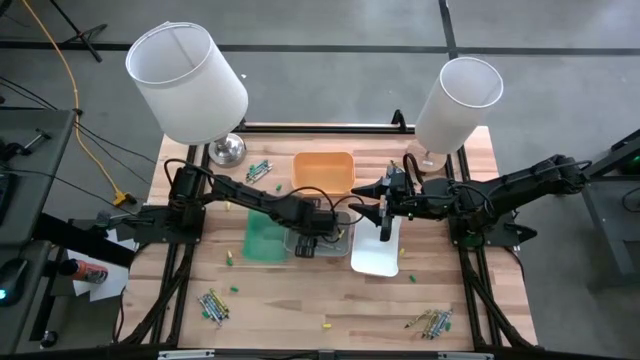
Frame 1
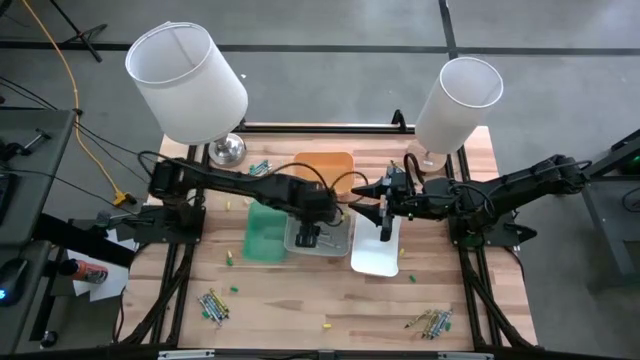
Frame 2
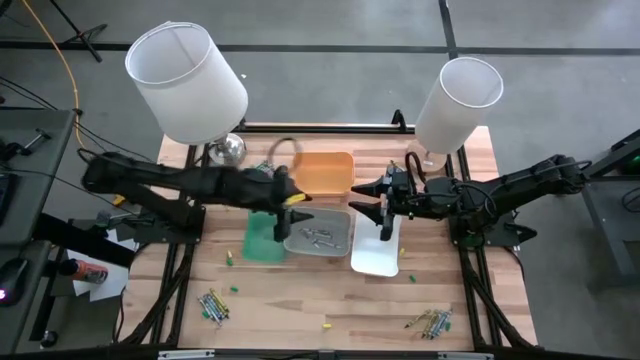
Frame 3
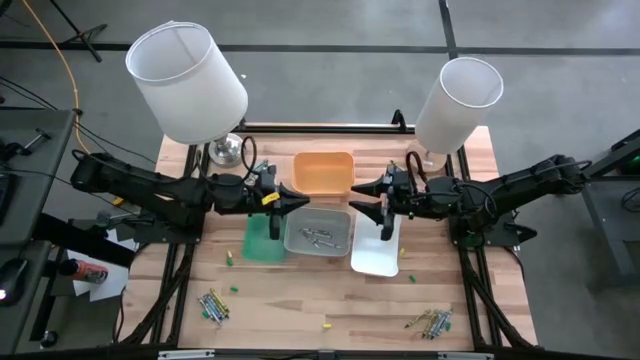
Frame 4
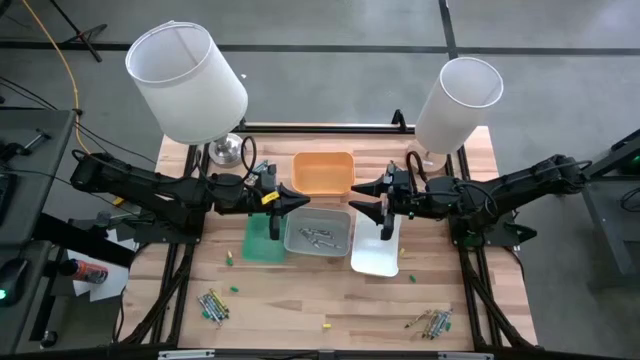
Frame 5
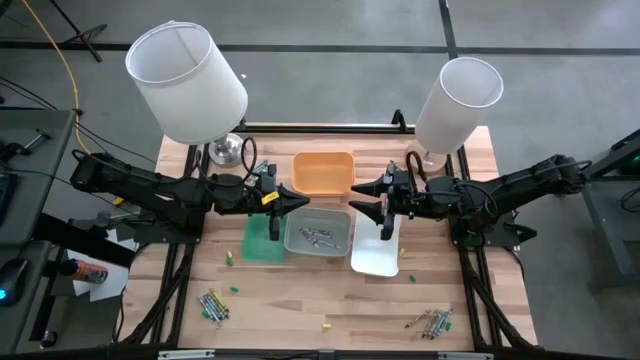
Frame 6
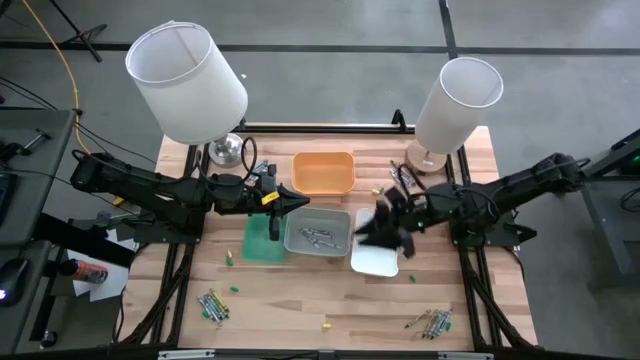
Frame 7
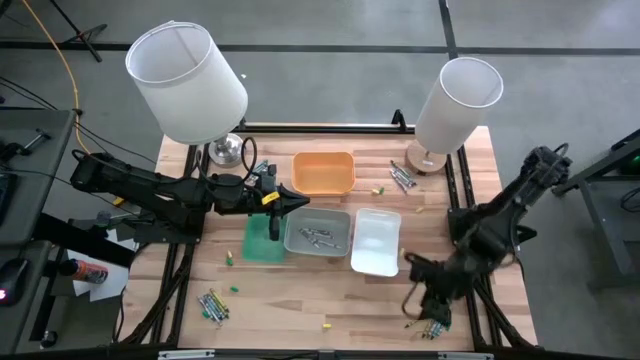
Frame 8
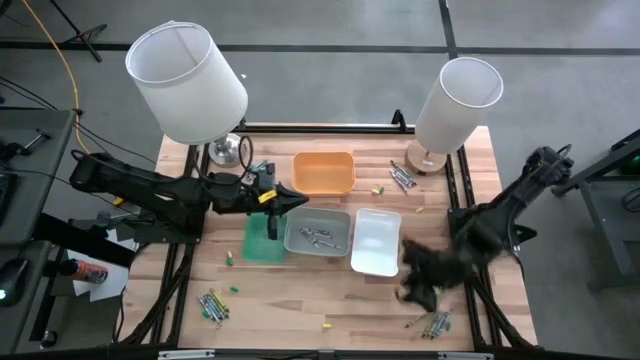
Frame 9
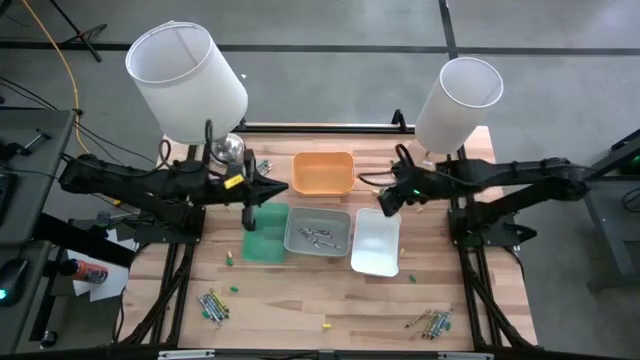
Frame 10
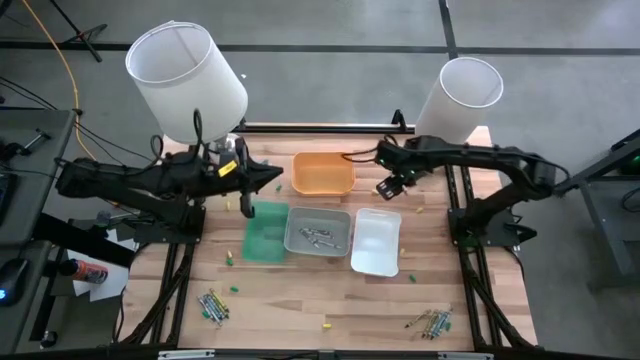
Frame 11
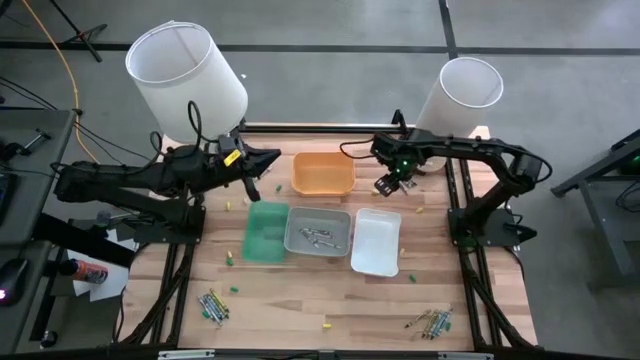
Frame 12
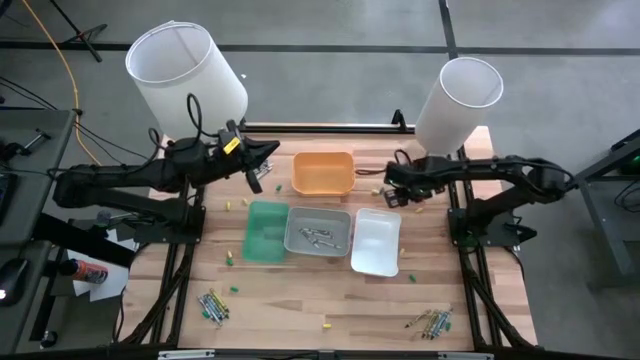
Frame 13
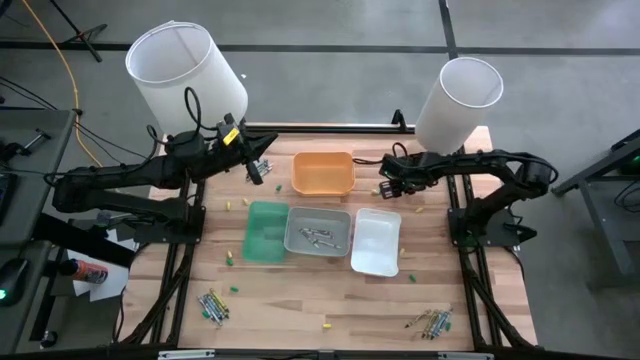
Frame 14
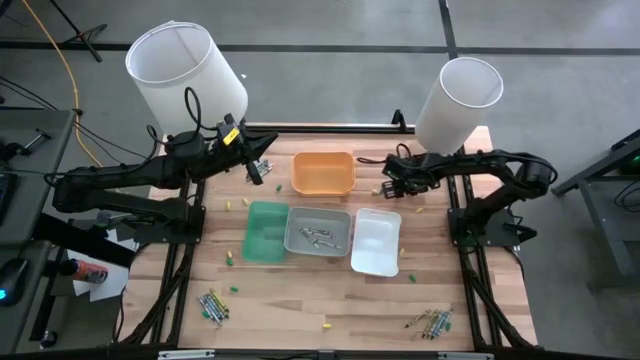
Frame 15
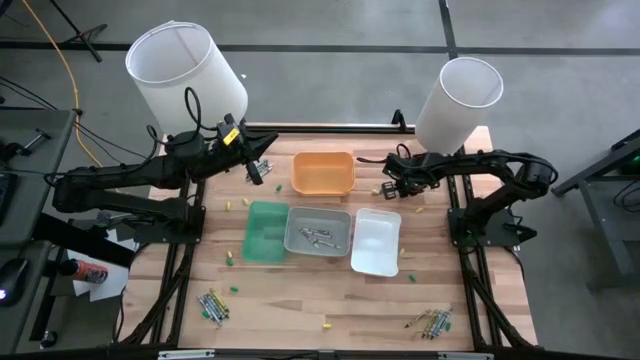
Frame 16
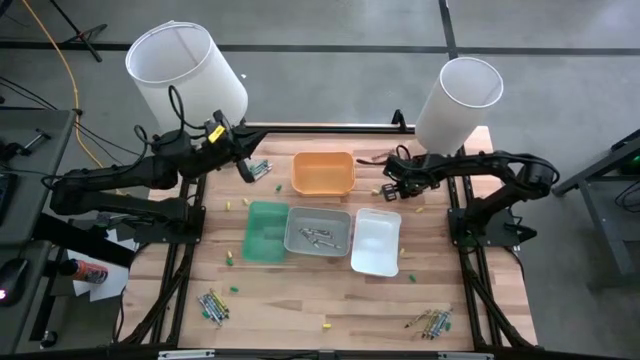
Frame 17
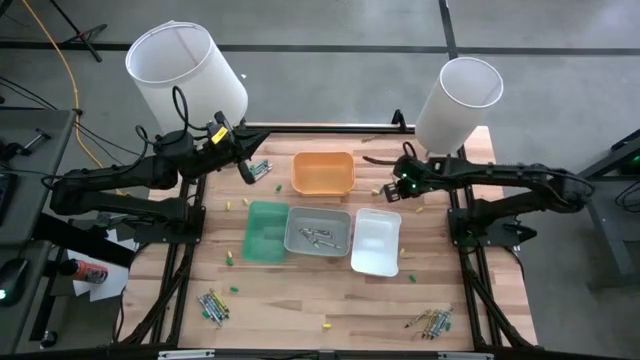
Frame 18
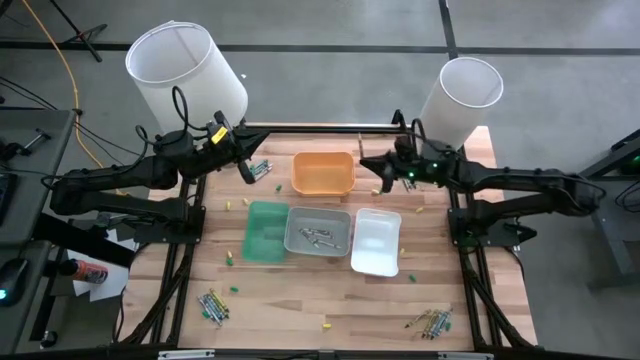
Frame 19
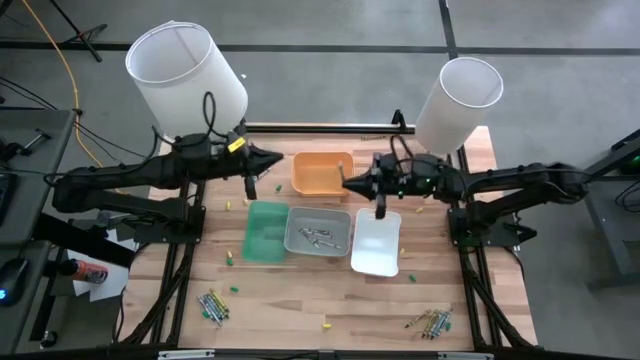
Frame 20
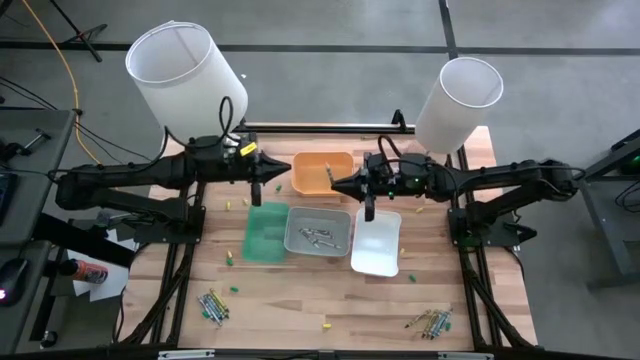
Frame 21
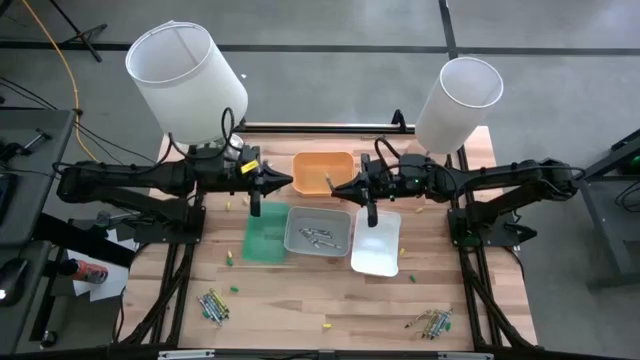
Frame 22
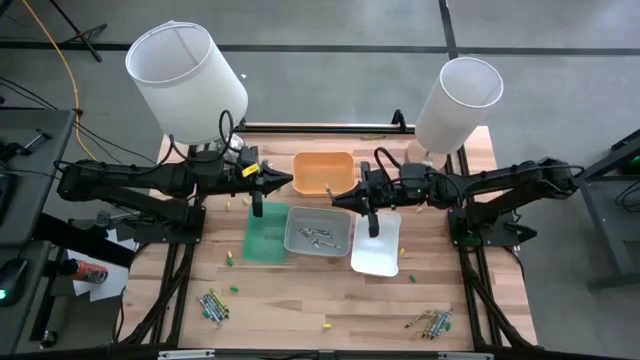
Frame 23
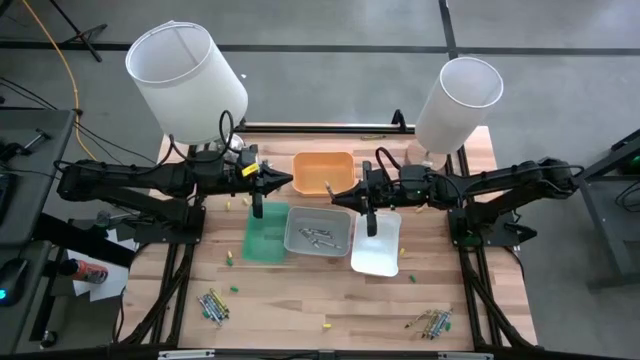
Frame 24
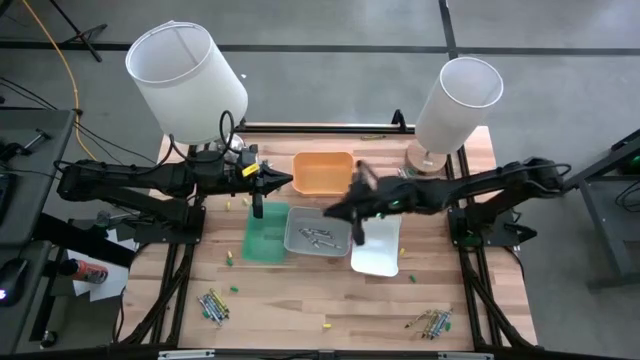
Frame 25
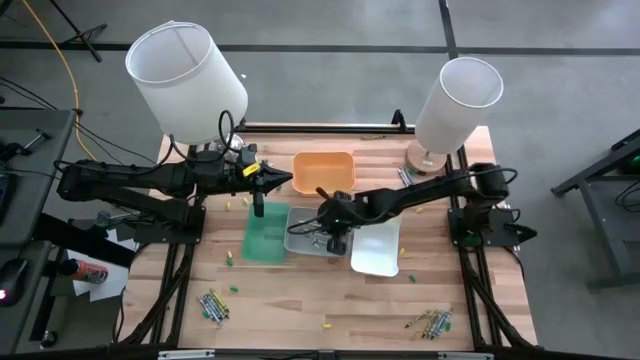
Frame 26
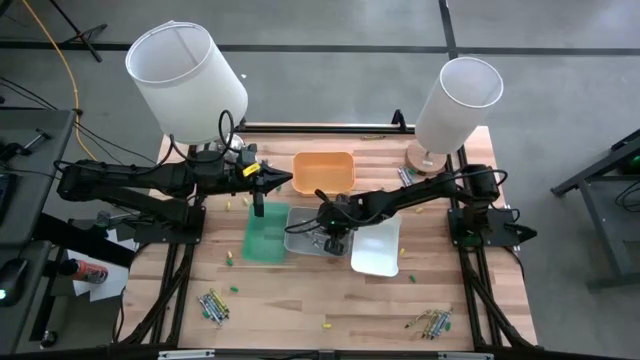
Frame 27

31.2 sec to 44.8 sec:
Task: Sort crayons
Put the white crayon into the gray bin

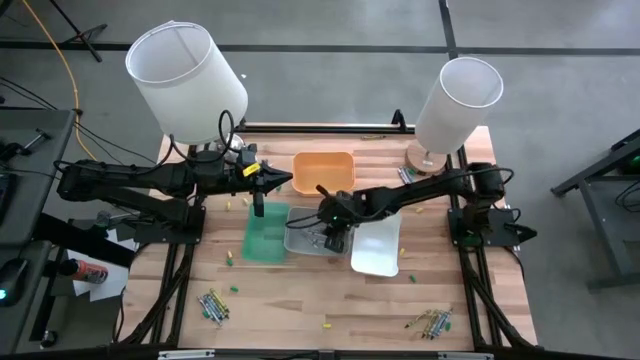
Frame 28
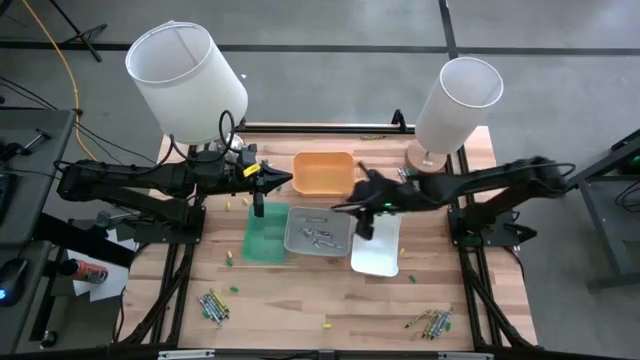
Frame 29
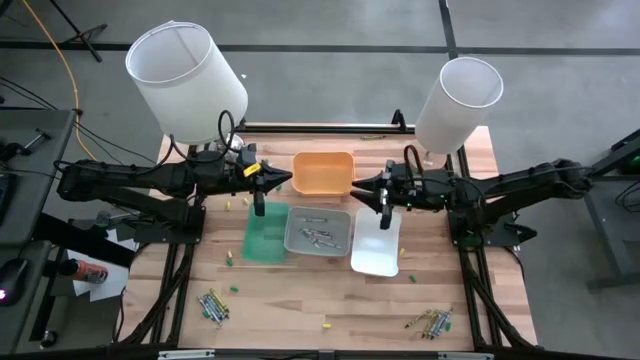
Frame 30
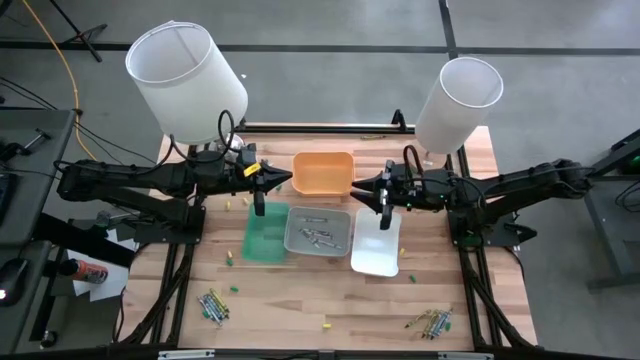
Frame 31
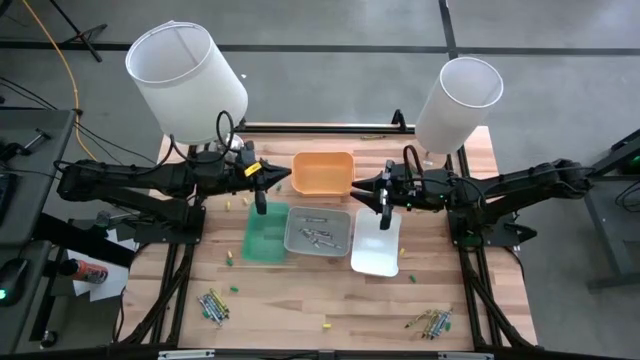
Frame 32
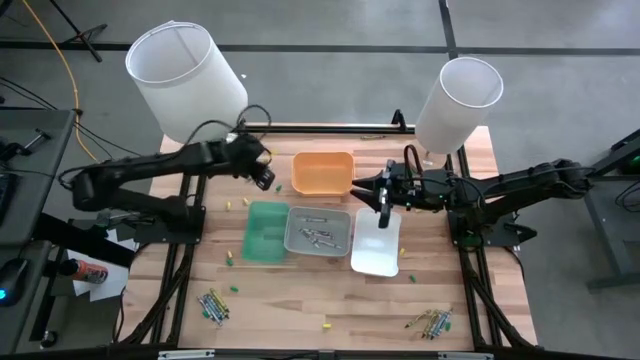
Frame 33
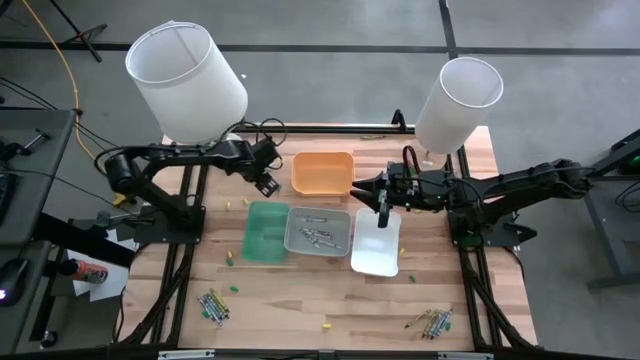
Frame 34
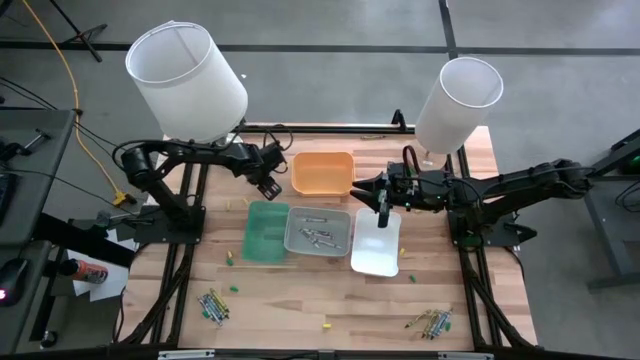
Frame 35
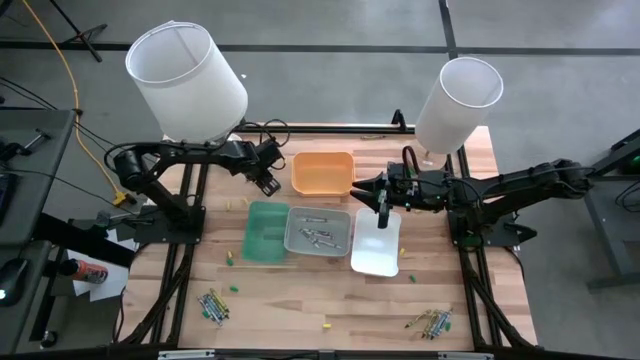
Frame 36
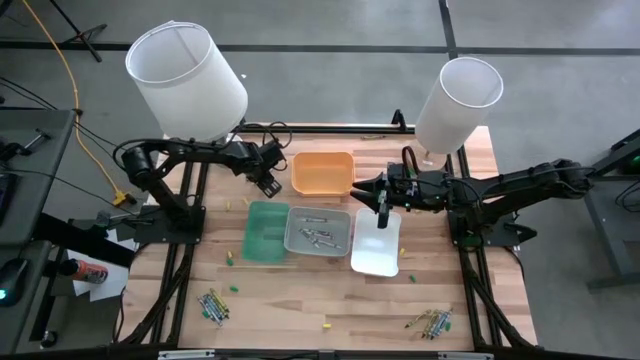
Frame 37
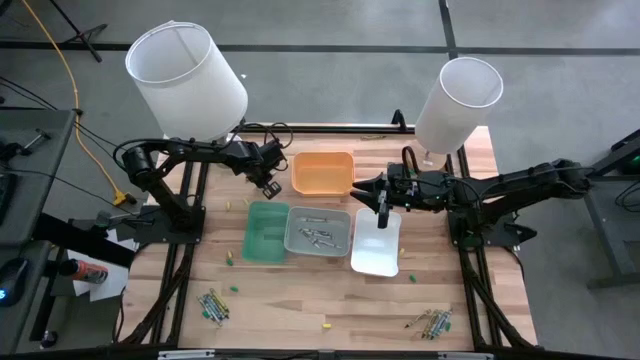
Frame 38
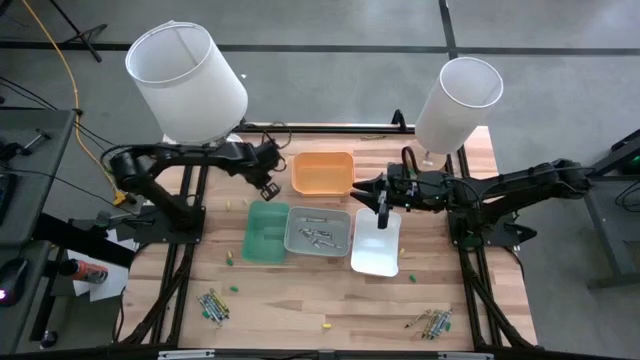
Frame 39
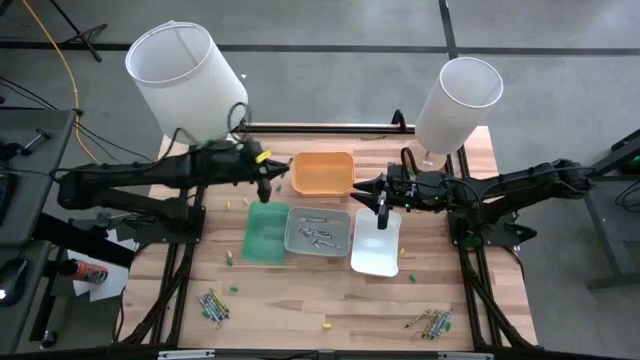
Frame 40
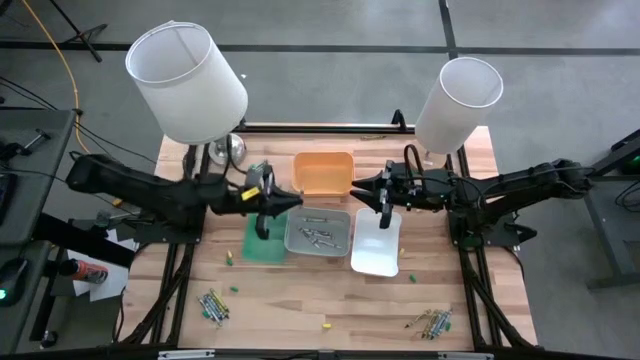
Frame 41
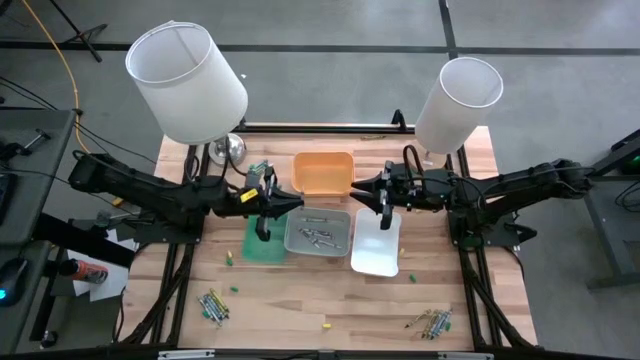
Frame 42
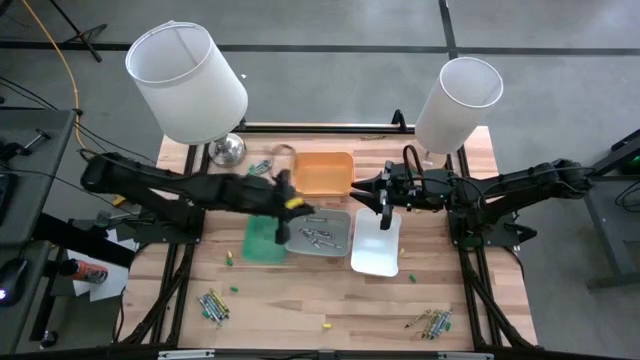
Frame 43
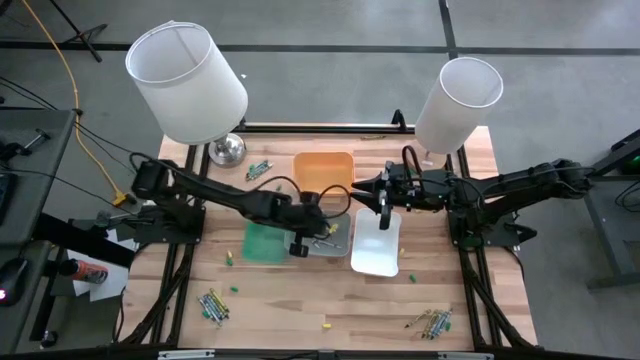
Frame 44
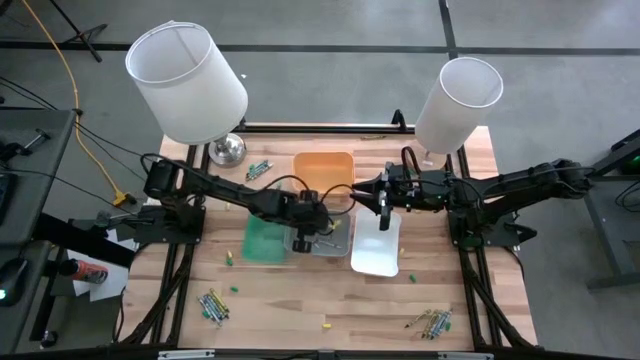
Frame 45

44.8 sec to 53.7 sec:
Put the white crayon into the gray bin
